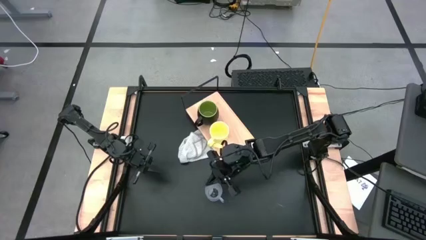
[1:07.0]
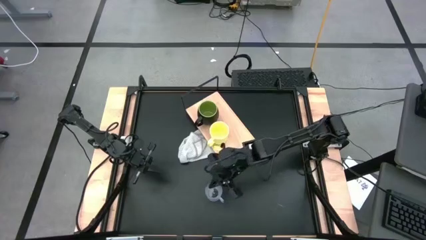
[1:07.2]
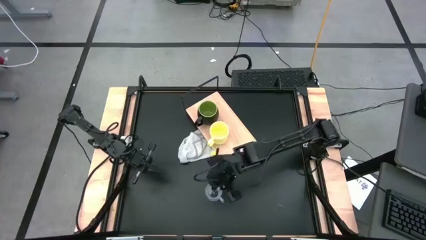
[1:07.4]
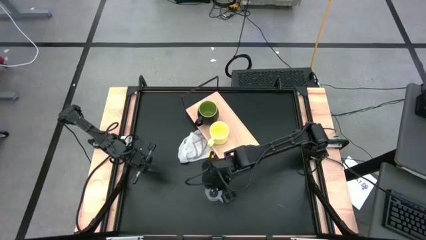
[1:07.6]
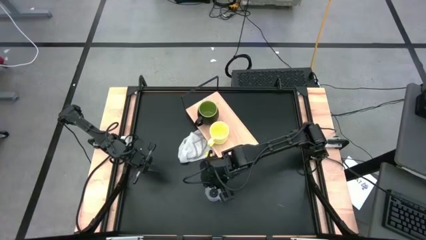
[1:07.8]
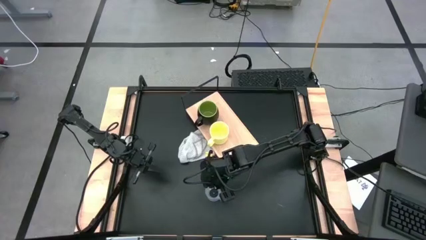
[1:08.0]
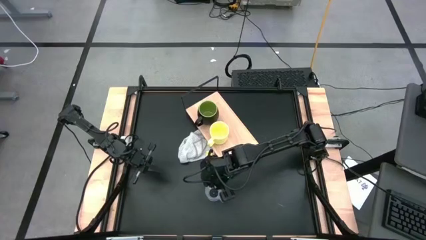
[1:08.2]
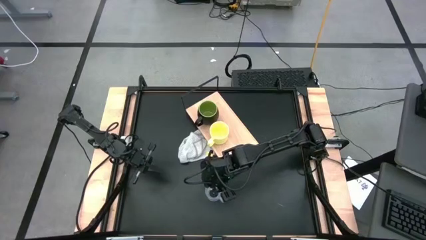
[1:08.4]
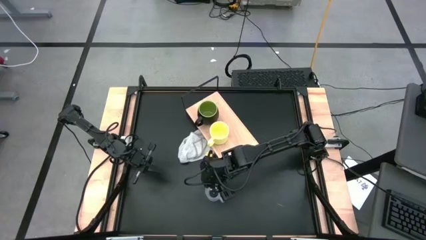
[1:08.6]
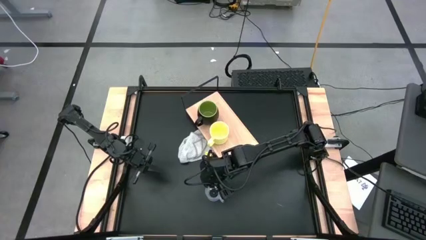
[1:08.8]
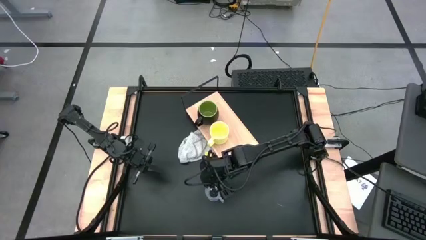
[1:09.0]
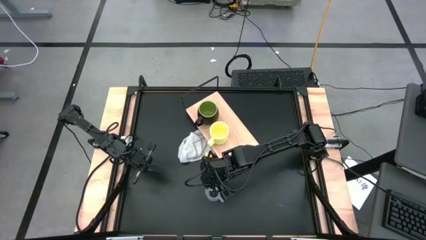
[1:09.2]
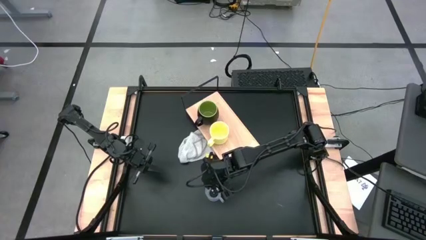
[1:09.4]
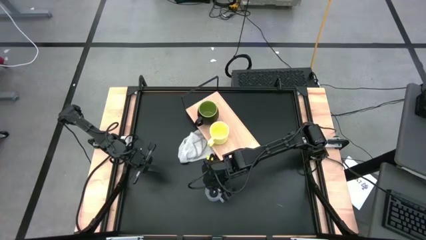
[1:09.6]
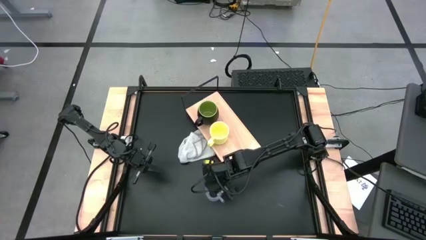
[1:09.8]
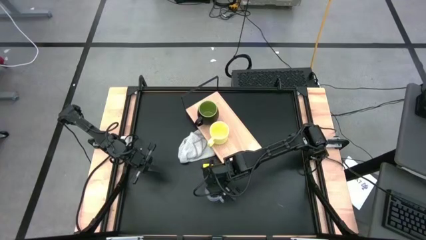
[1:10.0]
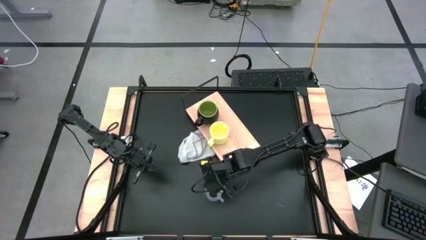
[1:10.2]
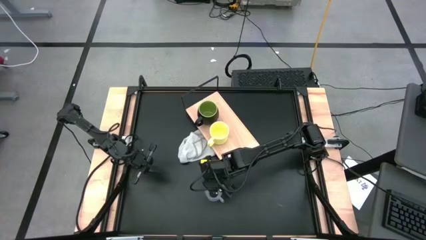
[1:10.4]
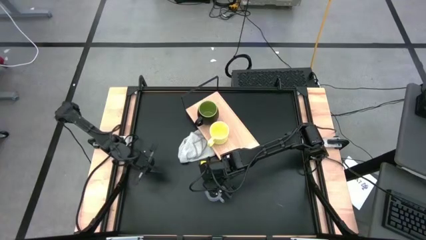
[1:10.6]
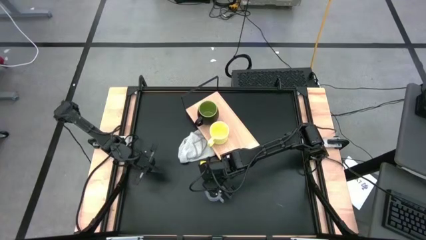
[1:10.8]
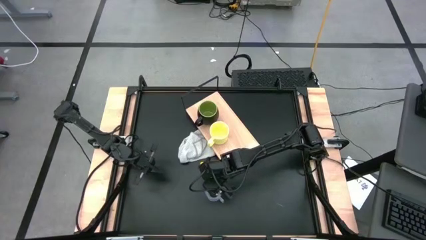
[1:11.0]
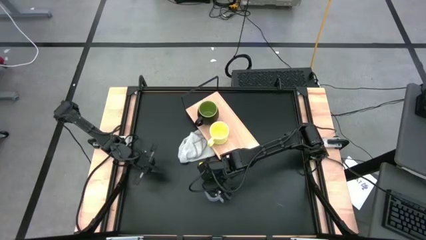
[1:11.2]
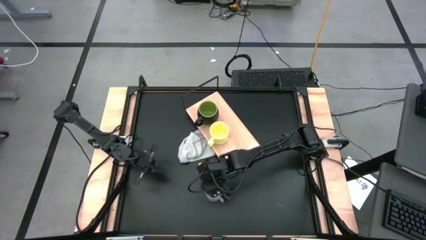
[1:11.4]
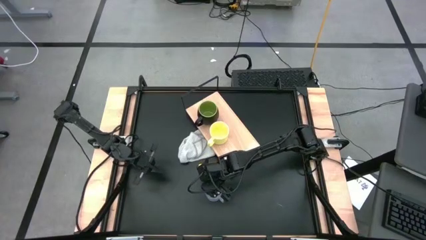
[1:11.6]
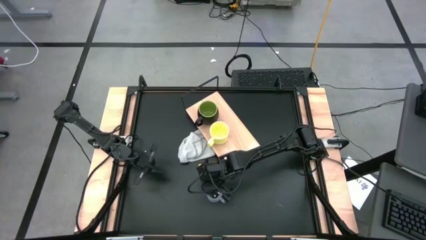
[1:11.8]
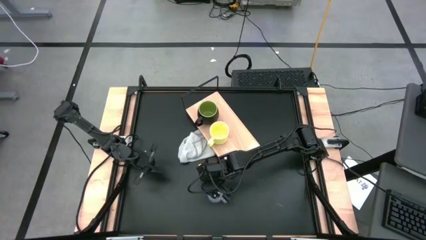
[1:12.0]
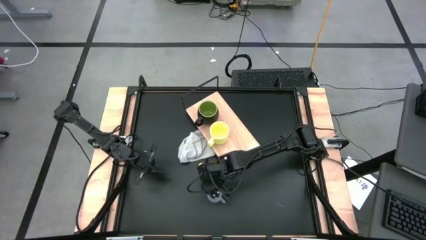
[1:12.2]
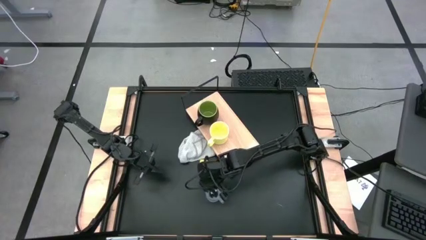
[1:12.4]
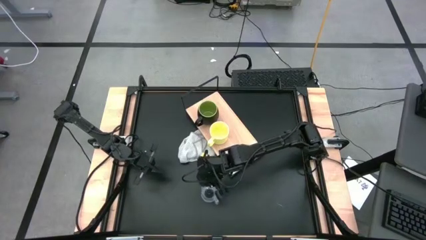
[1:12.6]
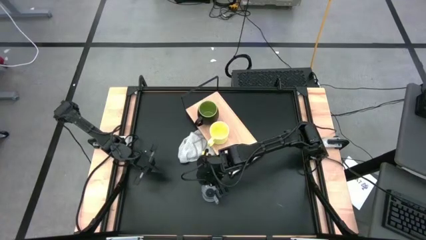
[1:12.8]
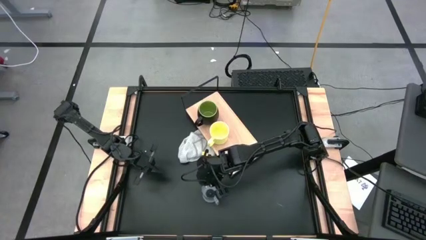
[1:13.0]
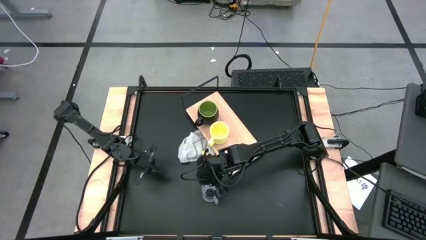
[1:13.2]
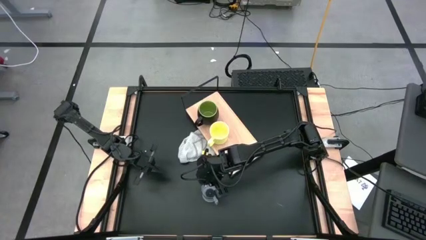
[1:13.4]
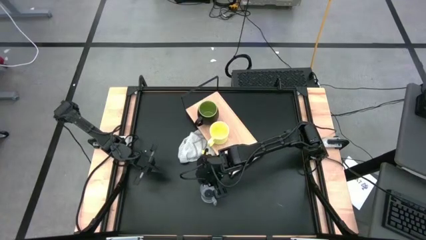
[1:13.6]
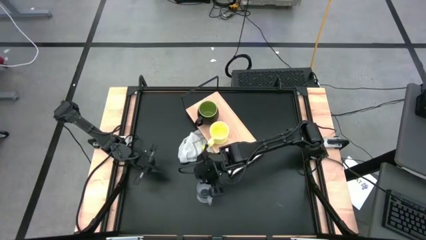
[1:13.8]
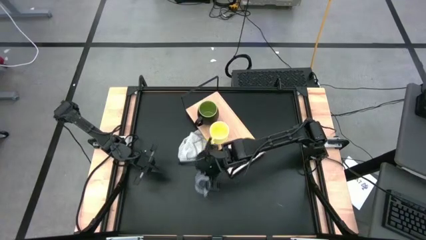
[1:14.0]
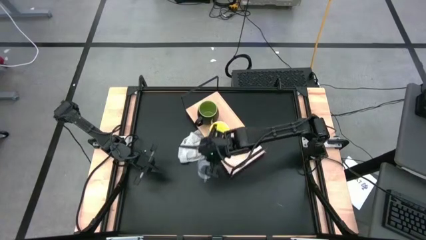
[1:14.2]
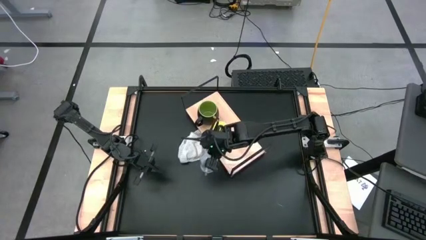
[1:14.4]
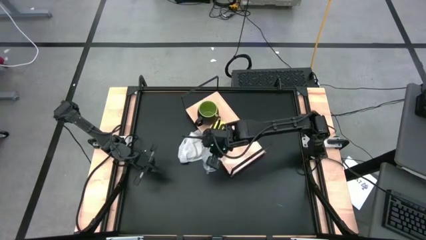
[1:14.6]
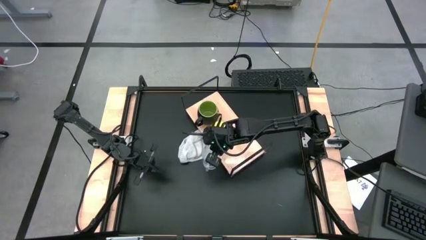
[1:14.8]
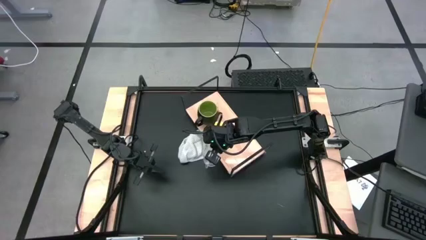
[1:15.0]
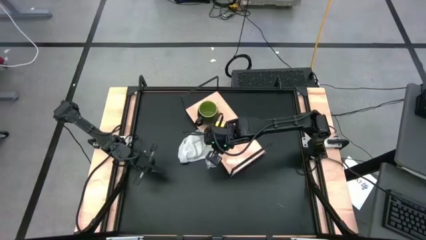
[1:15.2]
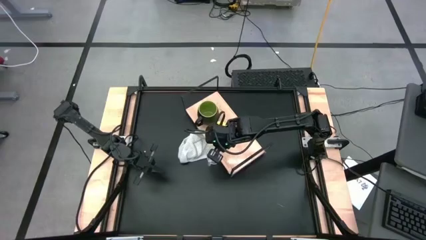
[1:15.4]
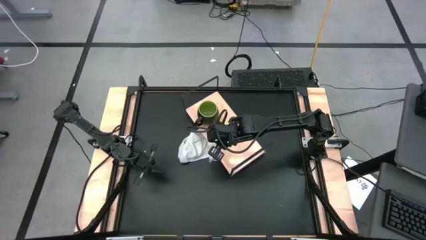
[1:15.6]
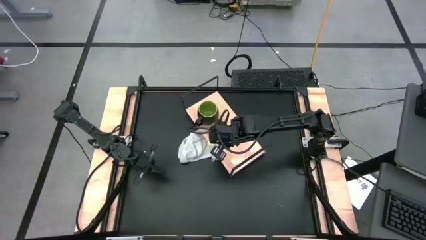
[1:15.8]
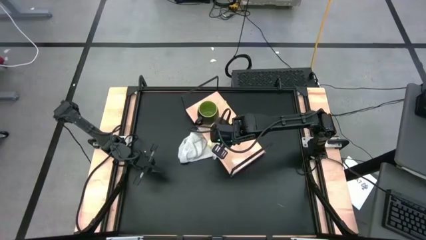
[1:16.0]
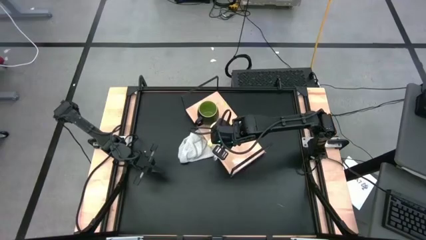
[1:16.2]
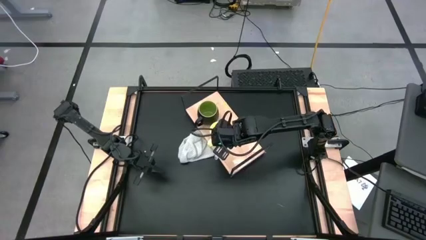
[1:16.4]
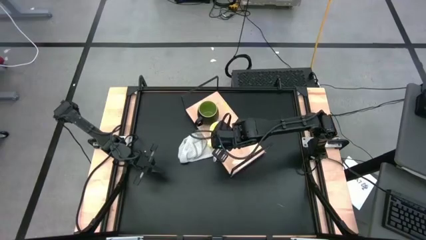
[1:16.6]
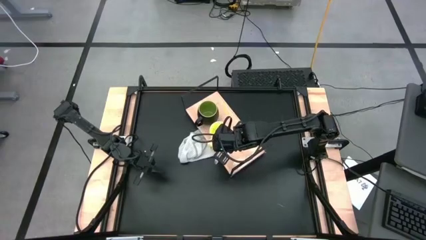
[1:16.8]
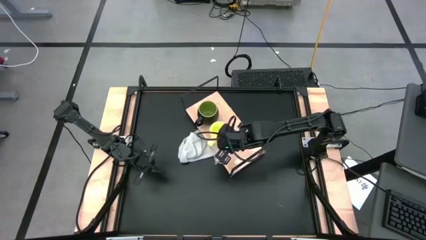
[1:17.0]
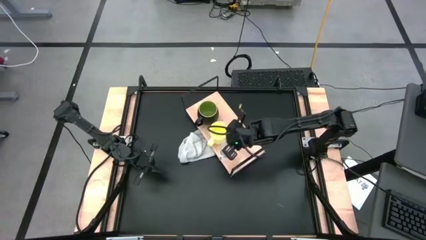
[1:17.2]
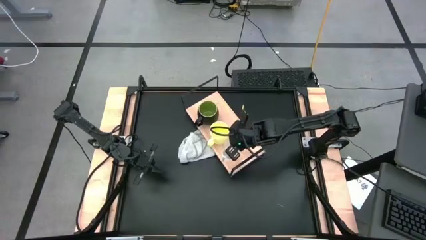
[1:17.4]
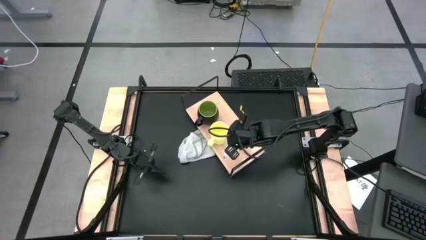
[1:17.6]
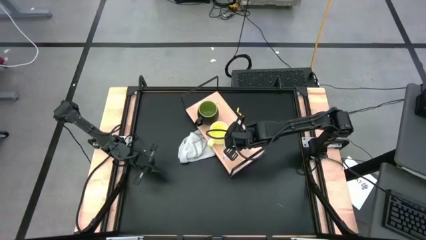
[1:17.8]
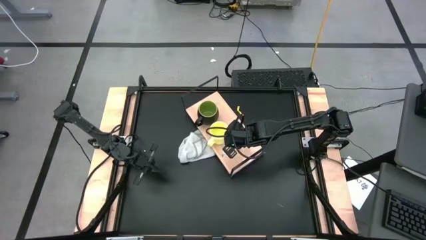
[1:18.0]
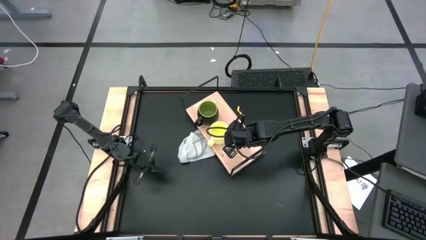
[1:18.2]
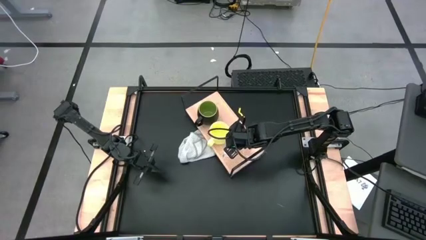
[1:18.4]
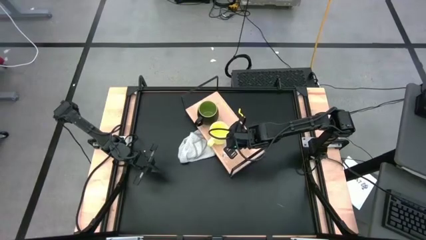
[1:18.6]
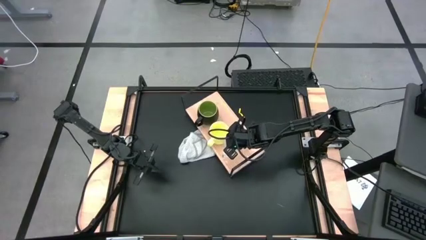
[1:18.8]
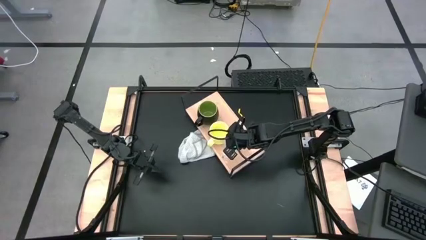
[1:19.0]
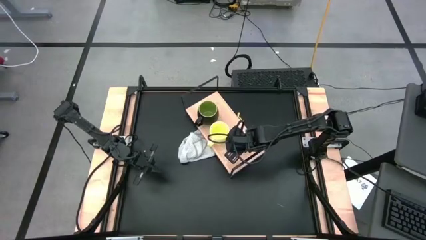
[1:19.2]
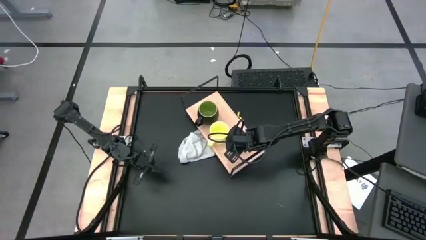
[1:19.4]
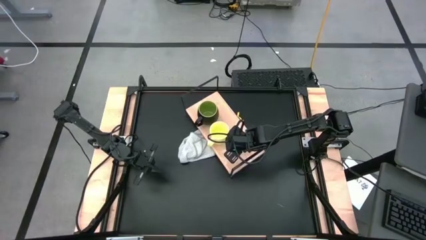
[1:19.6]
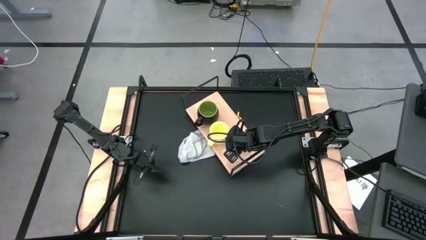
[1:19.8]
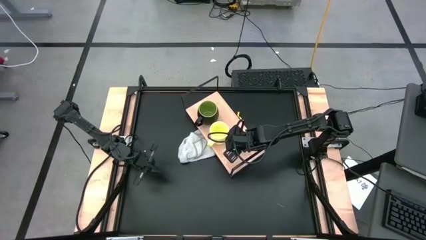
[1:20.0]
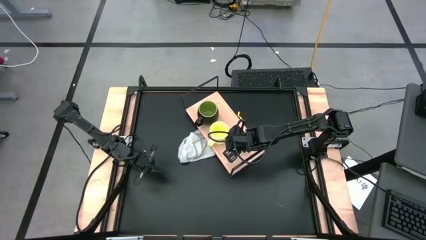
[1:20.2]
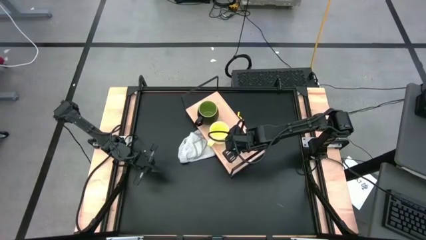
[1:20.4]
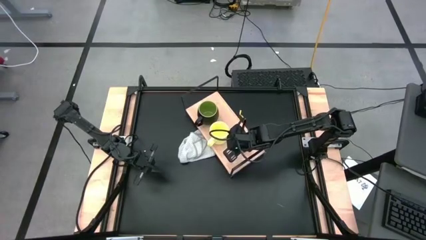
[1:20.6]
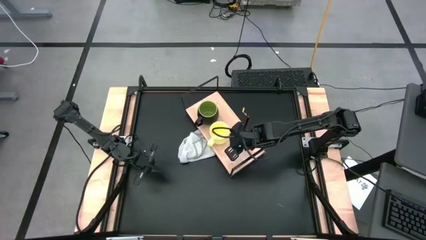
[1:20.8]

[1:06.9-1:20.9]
Task: Stack small to large cups/mugs on shelf
Put the transparent mug on the shelf
